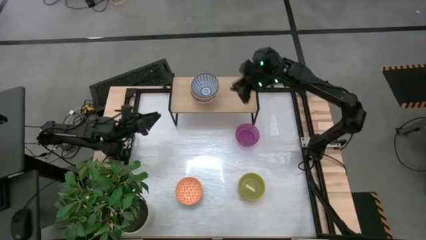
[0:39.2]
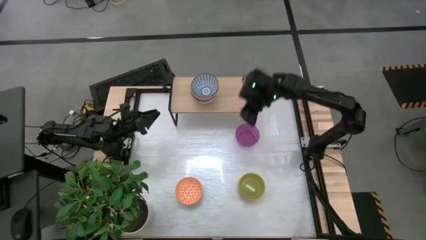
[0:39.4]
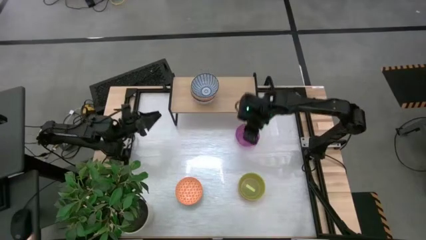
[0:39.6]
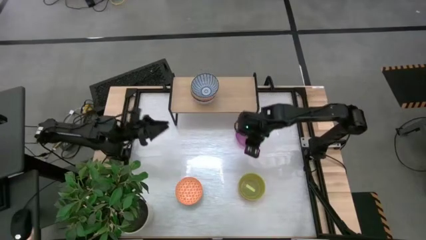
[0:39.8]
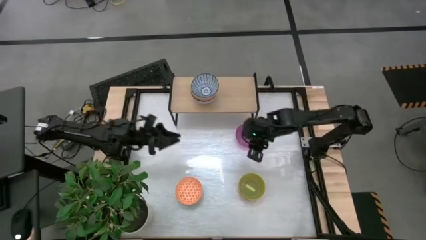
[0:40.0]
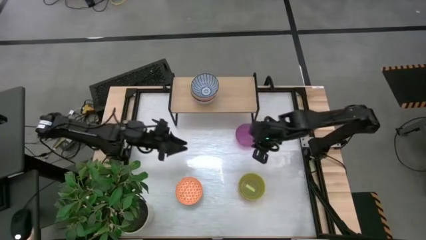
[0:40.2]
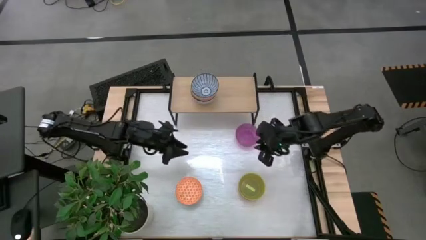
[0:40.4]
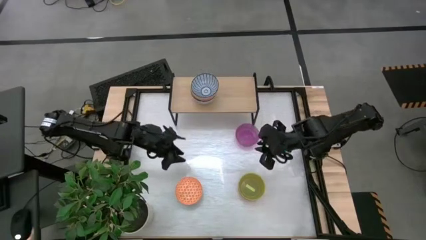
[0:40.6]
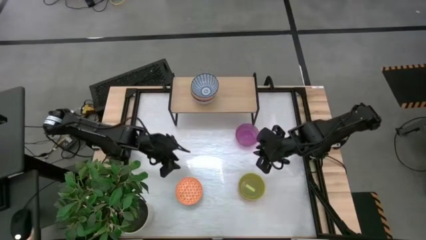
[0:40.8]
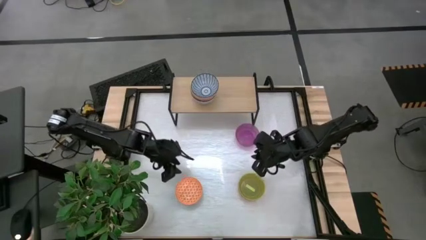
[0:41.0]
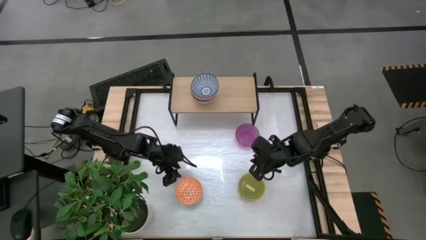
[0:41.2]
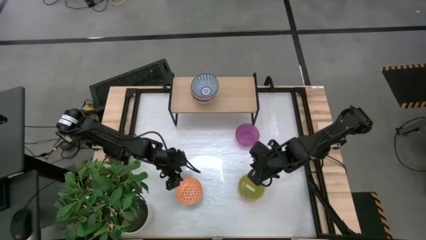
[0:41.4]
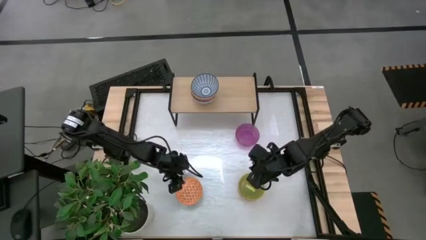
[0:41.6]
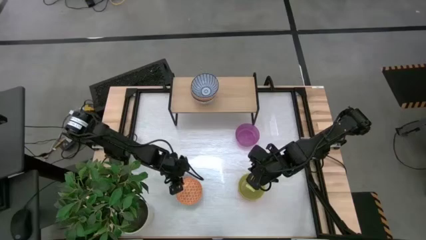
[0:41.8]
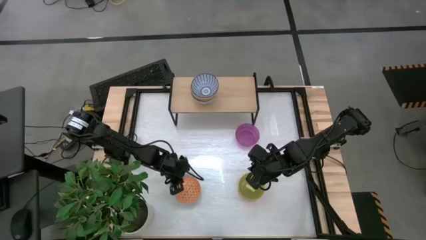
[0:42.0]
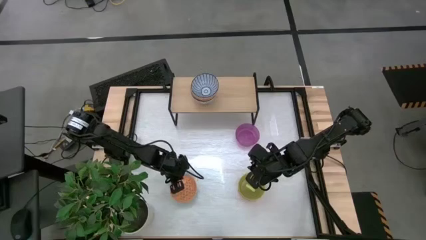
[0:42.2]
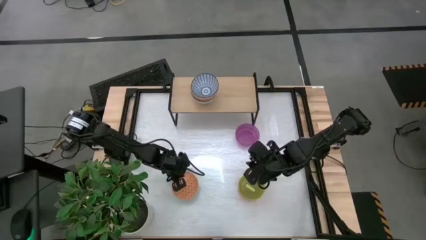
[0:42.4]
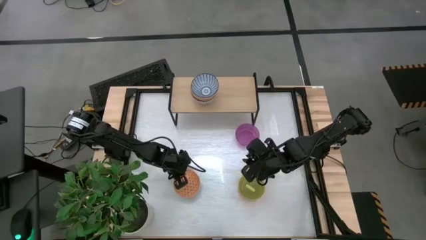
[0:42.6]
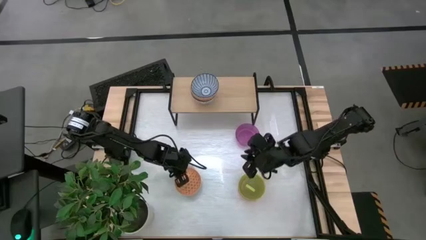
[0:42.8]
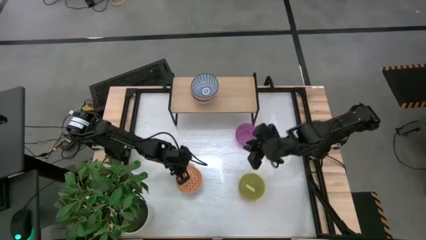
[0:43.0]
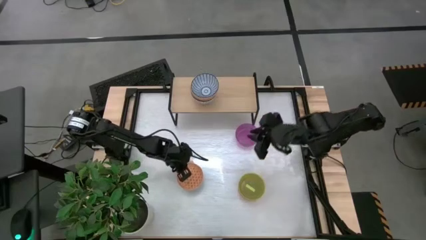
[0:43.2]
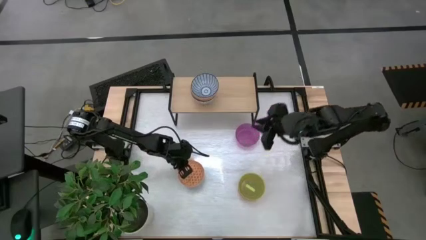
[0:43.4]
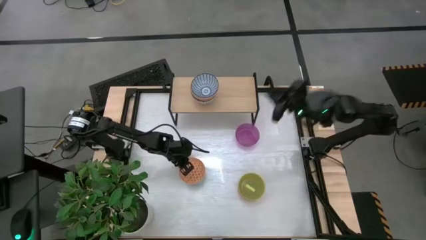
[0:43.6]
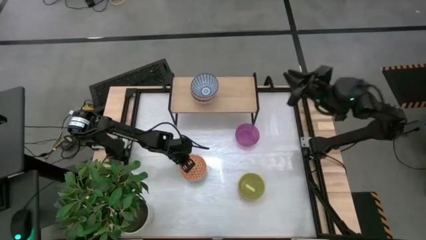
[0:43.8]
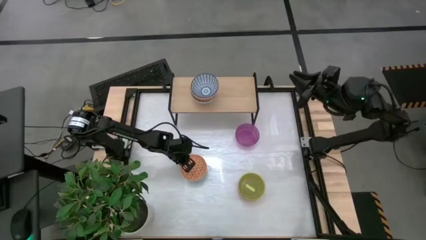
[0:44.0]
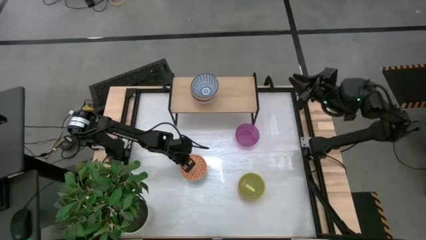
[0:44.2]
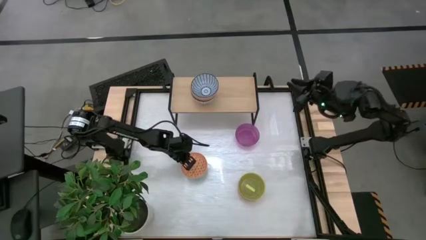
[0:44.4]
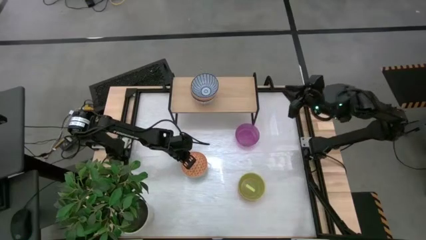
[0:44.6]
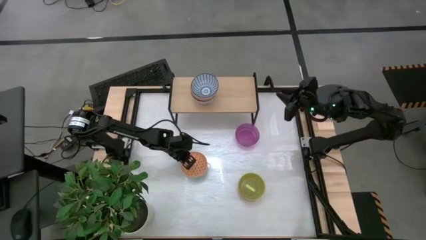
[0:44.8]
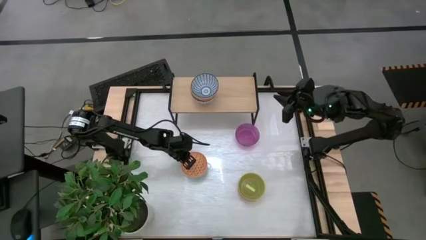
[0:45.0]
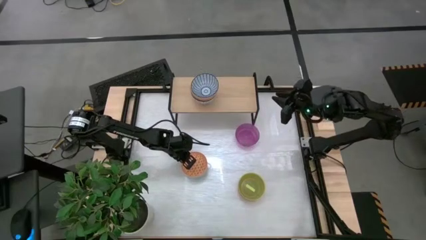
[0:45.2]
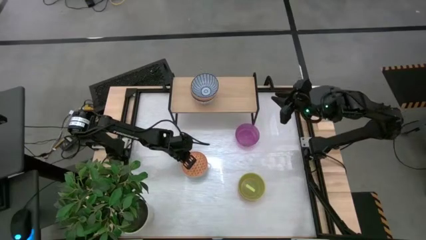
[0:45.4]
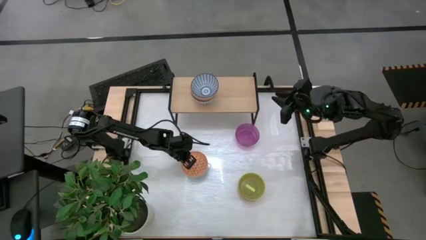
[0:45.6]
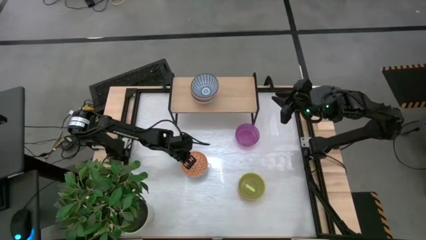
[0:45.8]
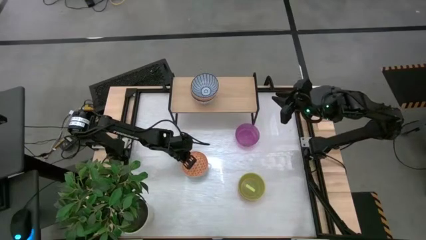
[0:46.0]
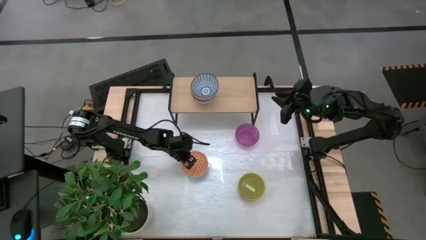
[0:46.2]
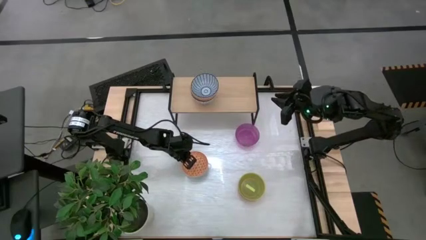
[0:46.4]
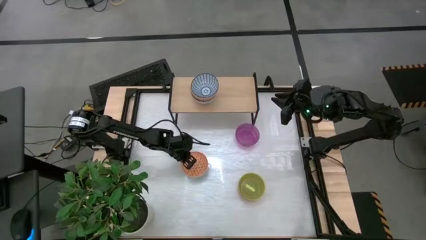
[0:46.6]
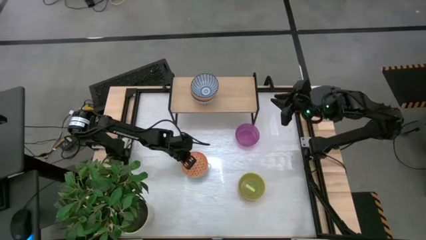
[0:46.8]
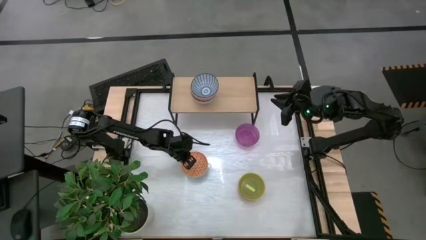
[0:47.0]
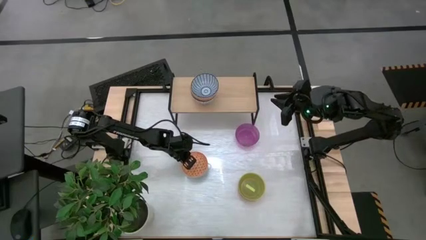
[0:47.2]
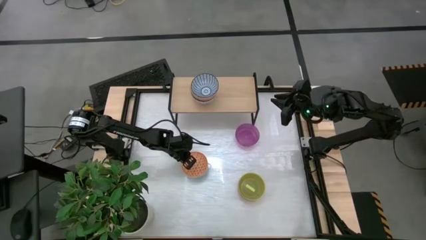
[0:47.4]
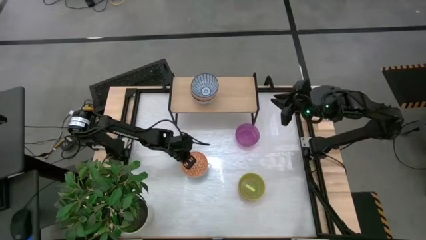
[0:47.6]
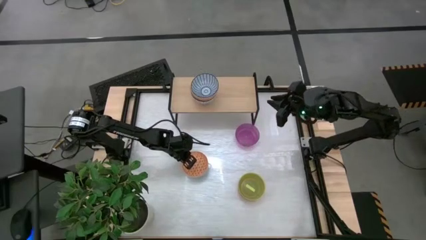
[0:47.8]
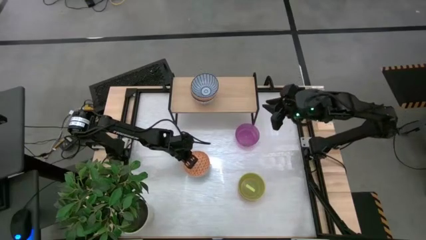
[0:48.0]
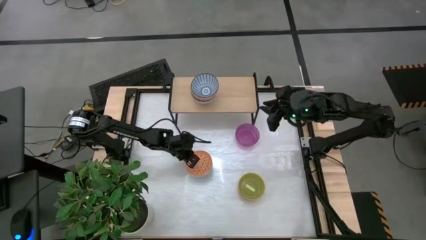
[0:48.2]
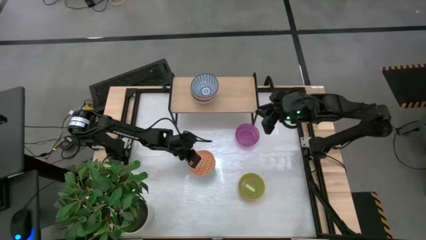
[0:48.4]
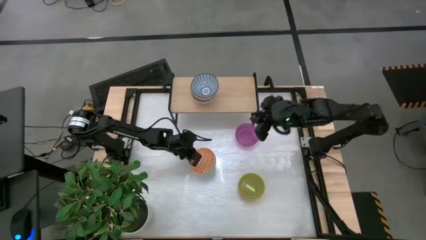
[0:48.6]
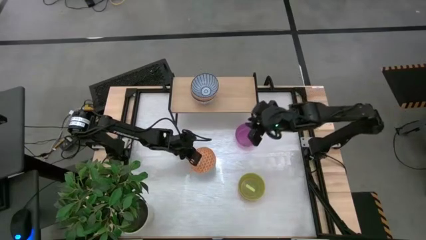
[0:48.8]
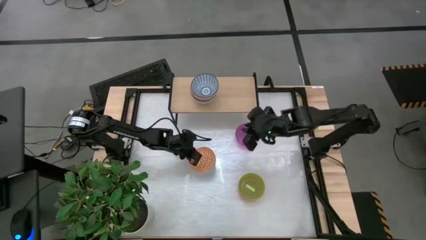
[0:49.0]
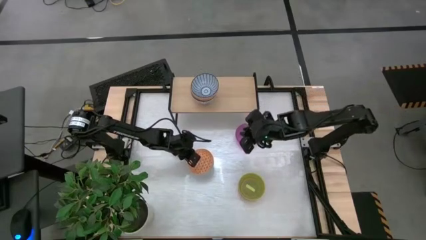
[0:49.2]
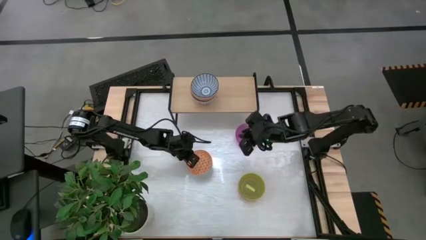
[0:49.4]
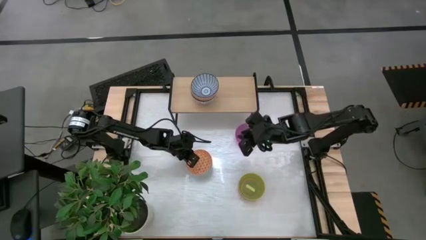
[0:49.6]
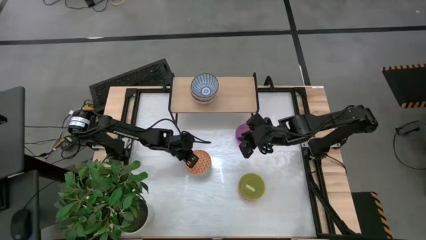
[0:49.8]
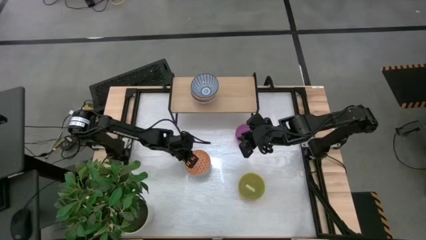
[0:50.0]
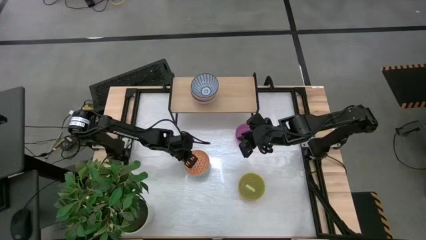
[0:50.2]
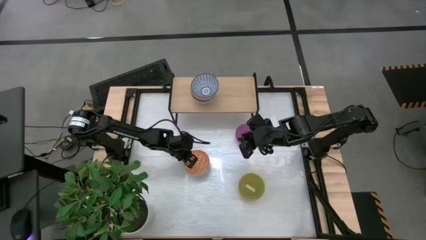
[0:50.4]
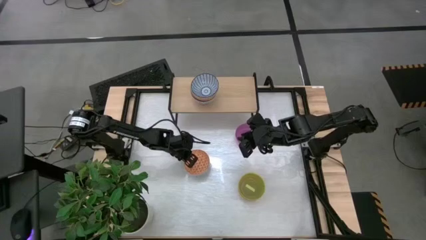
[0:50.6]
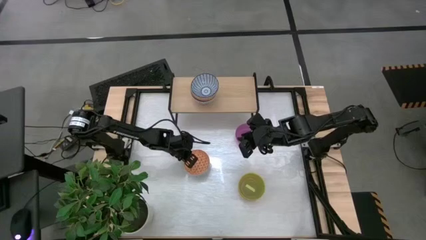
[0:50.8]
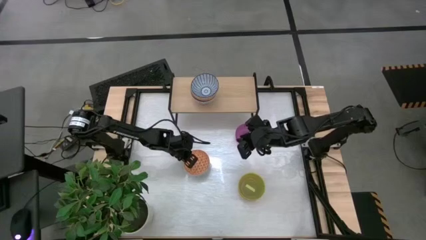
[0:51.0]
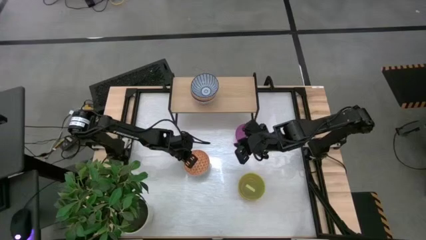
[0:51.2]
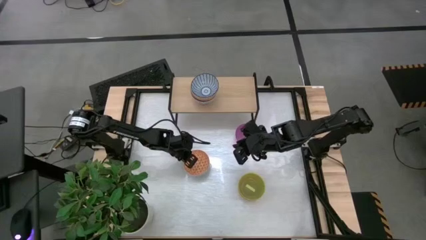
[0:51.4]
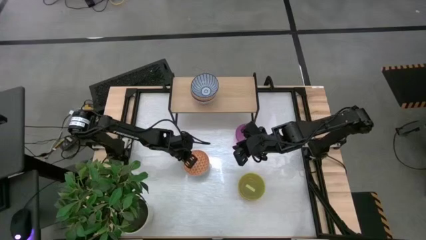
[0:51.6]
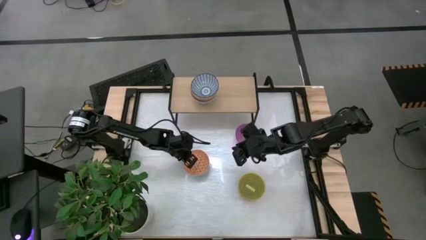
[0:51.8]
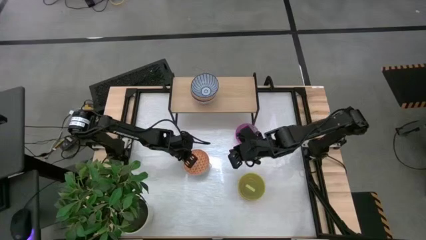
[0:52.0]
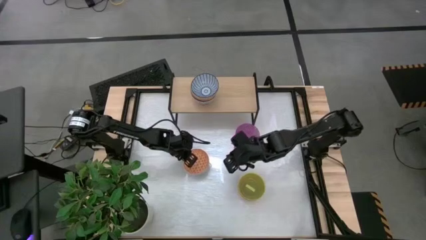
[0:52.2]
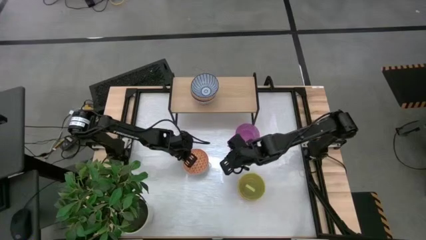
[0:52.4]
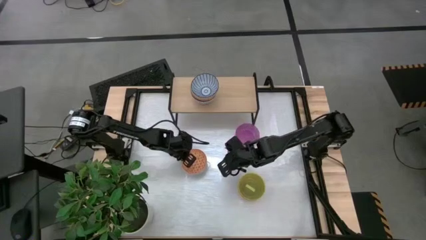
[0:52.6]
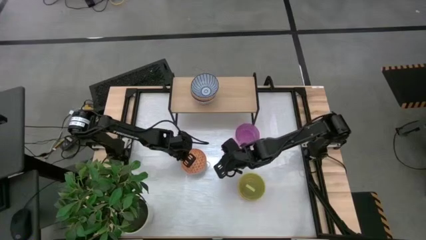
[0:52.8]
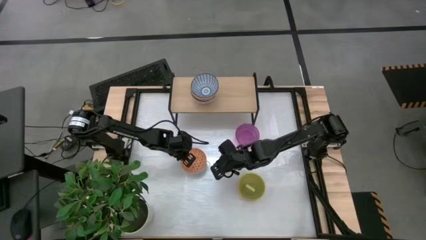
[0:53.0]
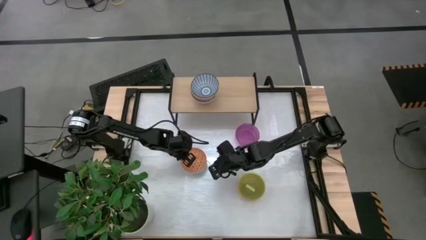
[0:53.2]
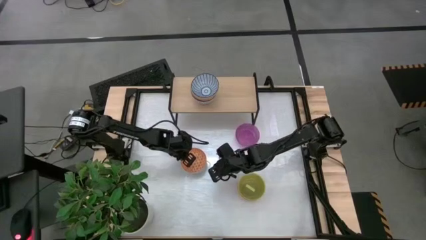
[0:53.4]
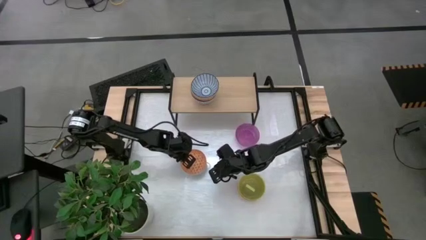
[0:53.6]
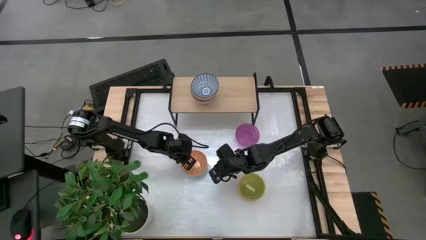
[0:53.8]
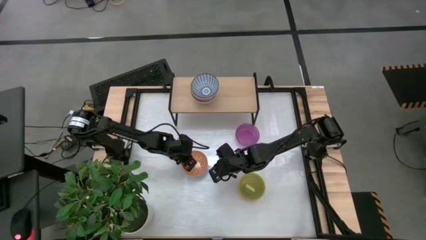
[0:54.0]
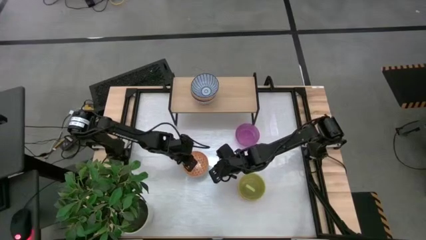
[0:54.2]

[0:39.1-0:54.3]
Task: Place and stack bowls onto a shelf
Stack the orange patterned bowl on top of the blue patterned bowl on the shelf
